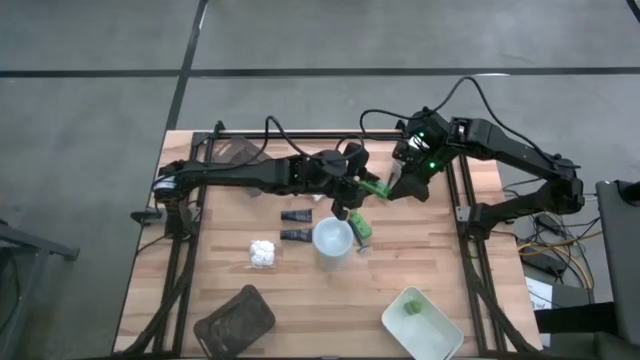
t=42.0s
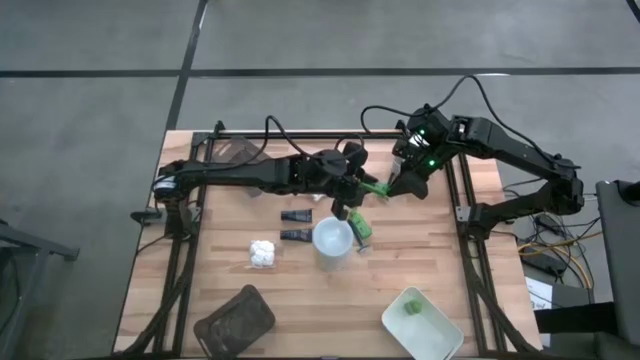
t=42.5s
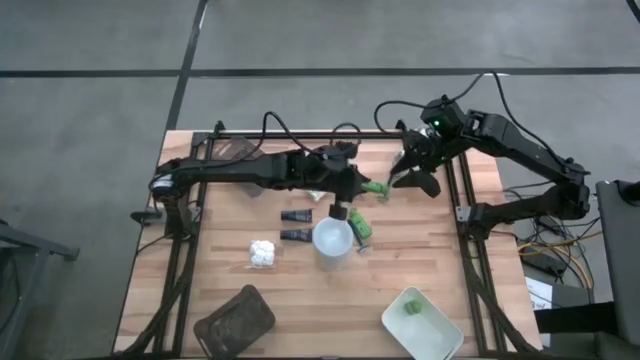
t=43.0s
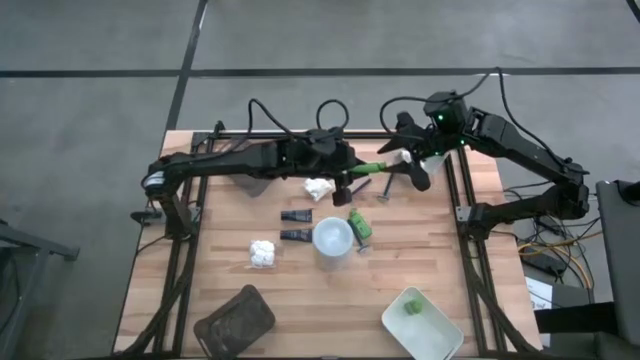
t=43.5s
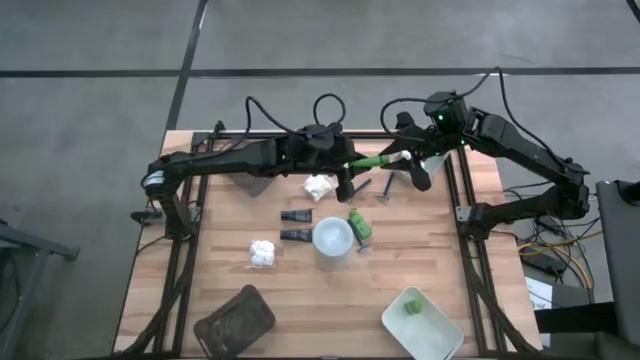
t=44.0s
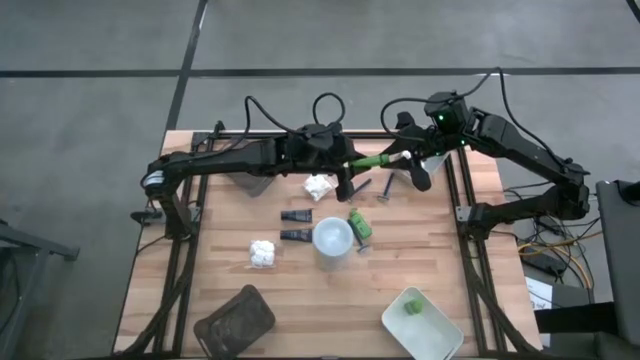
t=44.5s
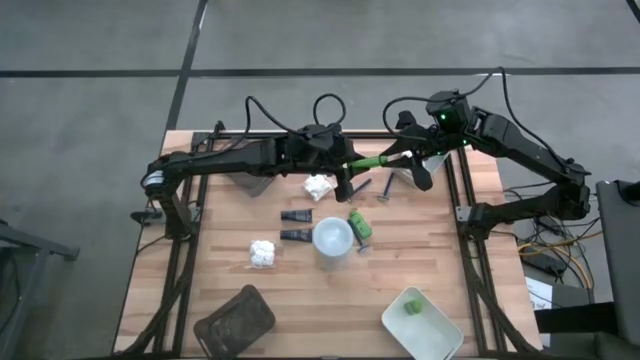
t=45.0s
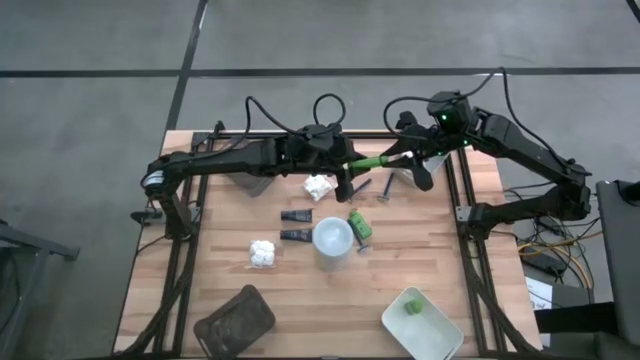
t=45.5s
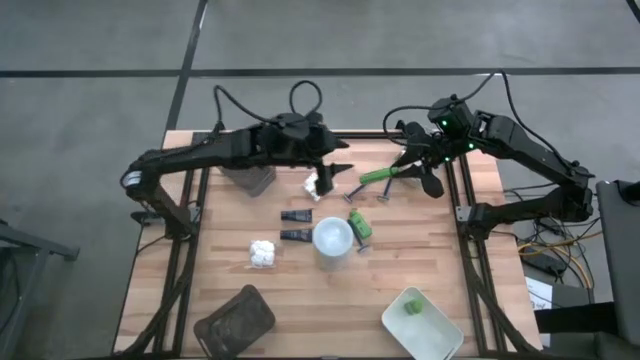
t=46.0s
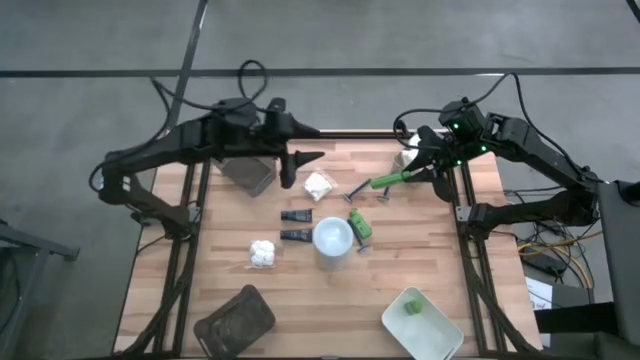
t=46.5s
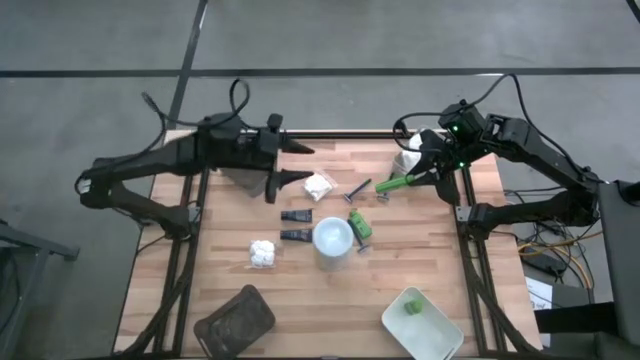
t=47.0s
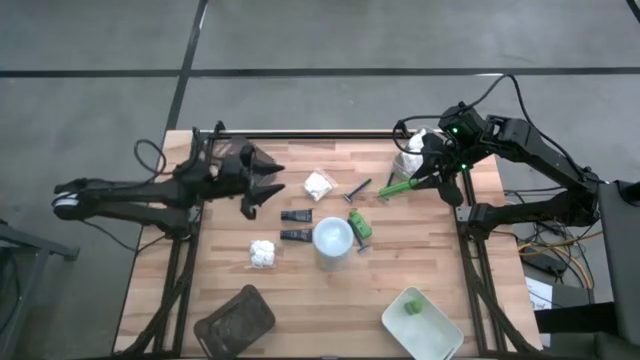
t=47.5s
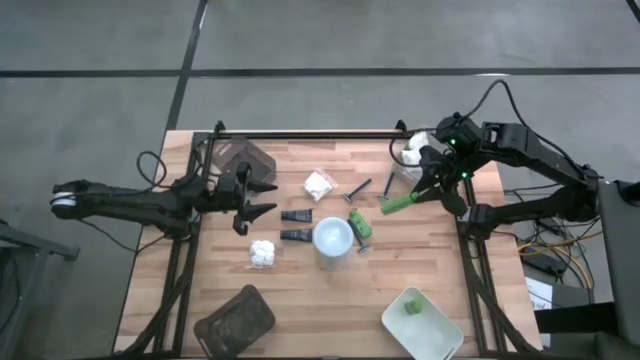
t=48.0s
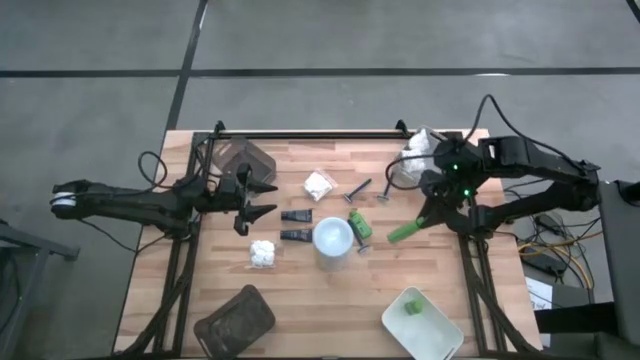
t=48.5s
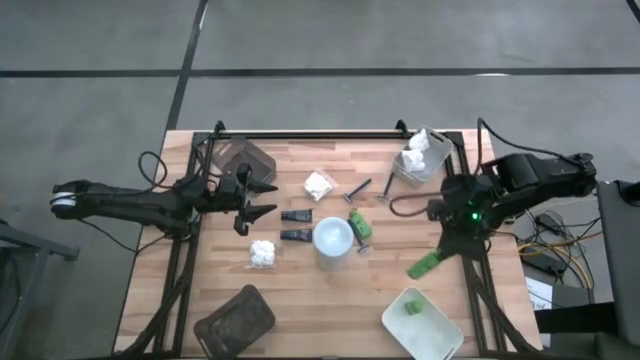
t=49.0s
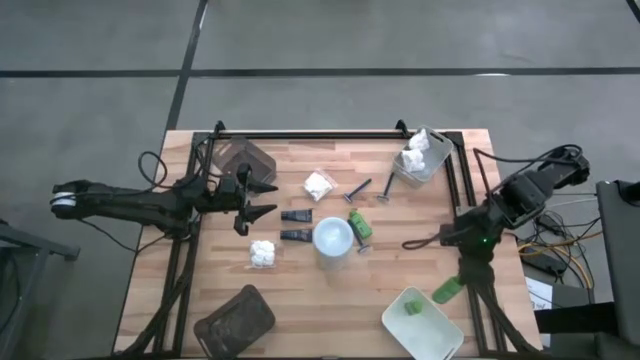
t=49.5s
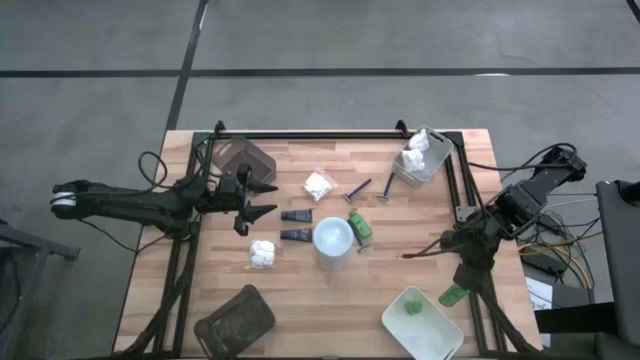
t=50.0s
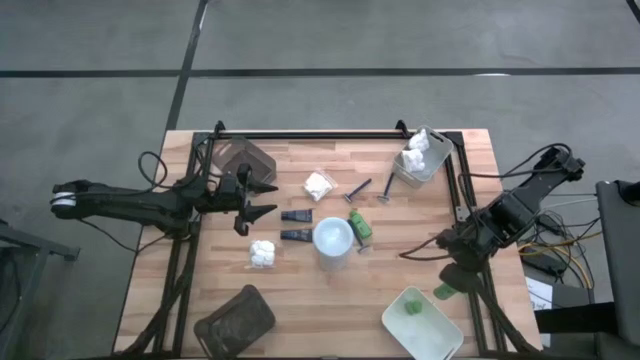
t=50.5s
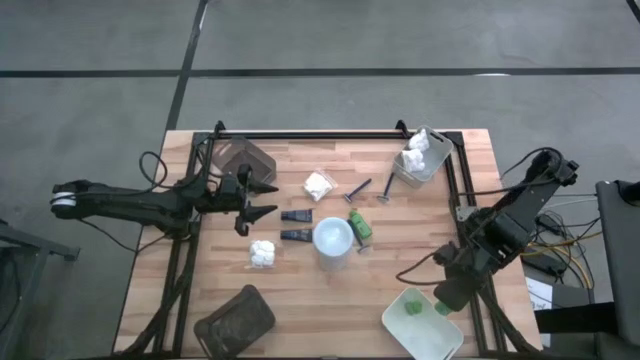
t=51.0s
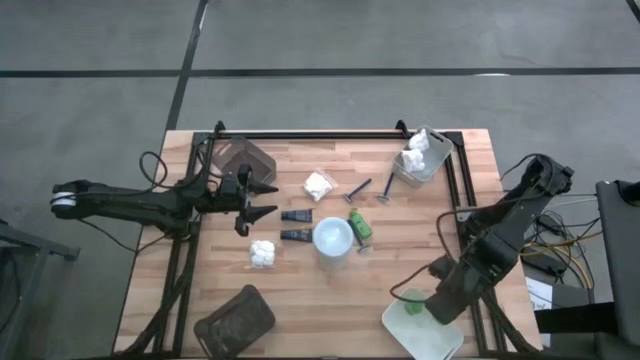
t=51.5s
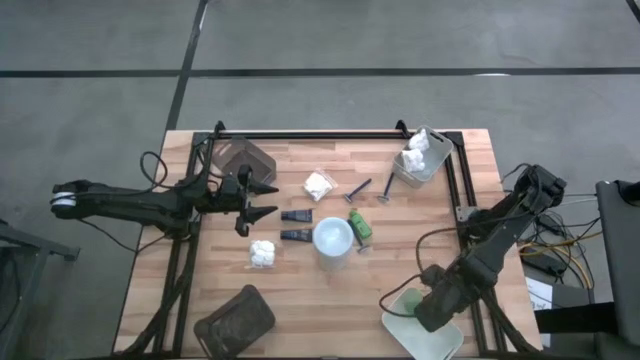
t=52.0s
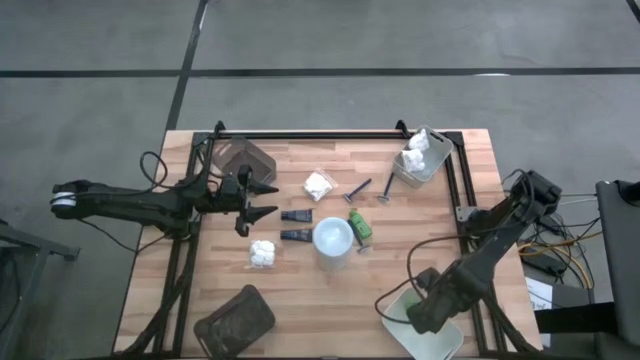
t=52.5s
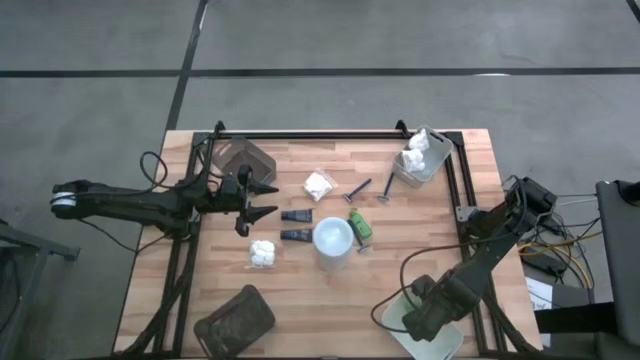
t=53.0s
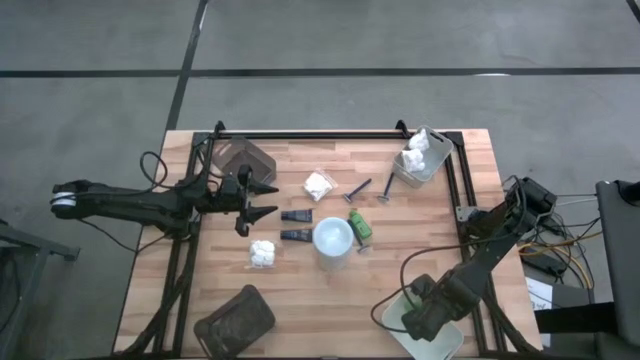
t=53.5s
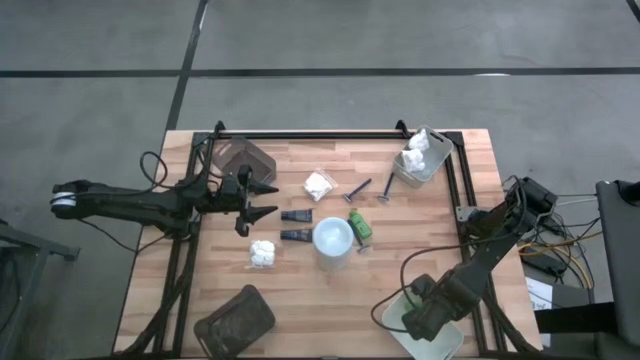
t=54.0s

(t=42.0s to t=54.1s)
Task: Pick & Place Travel size toiletries
Put the green shampoo into the white bin

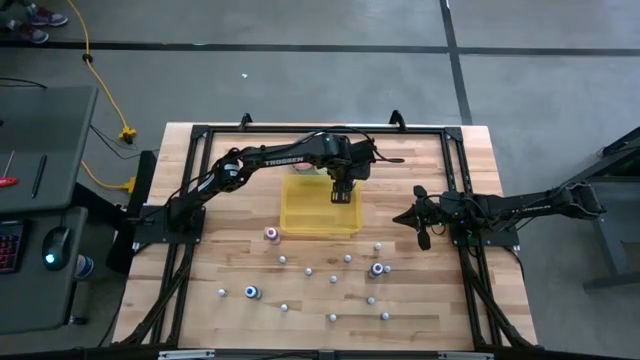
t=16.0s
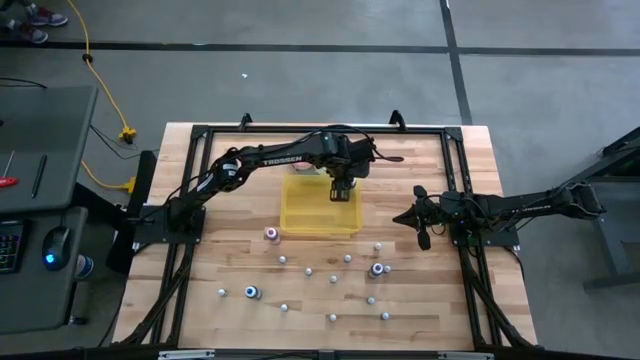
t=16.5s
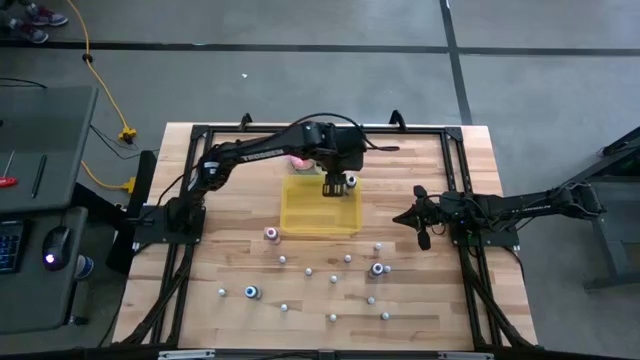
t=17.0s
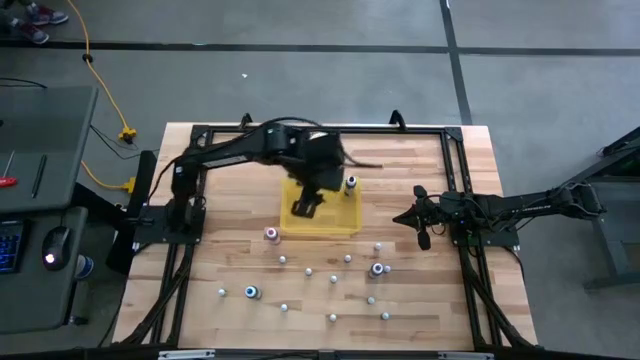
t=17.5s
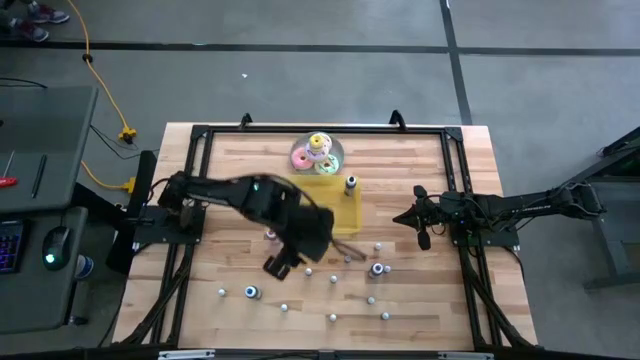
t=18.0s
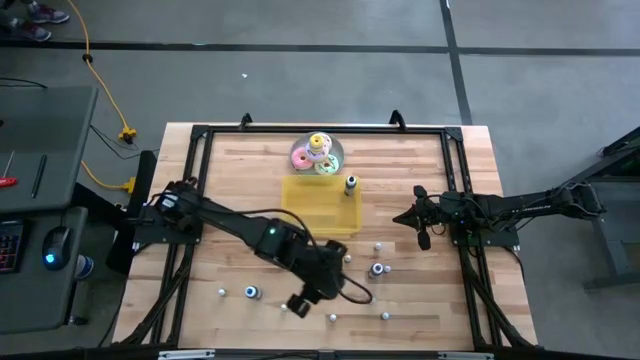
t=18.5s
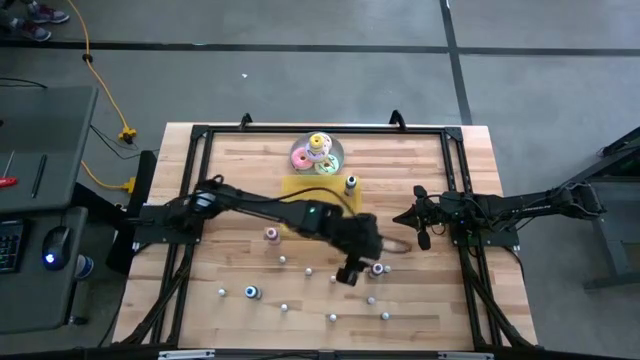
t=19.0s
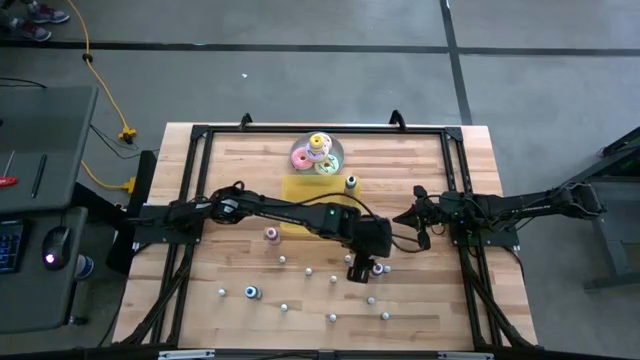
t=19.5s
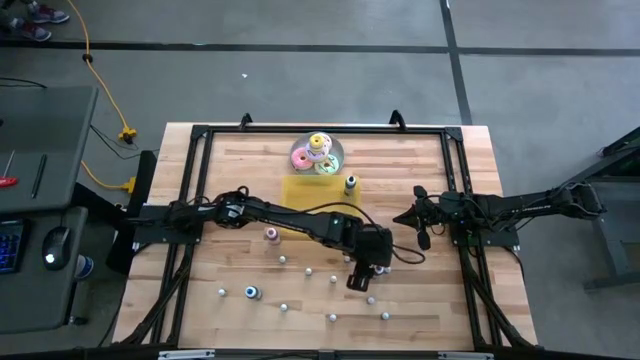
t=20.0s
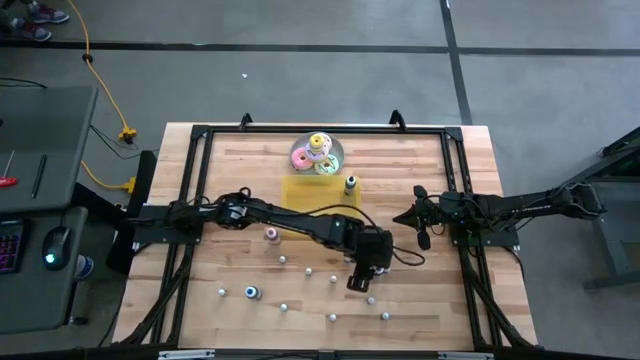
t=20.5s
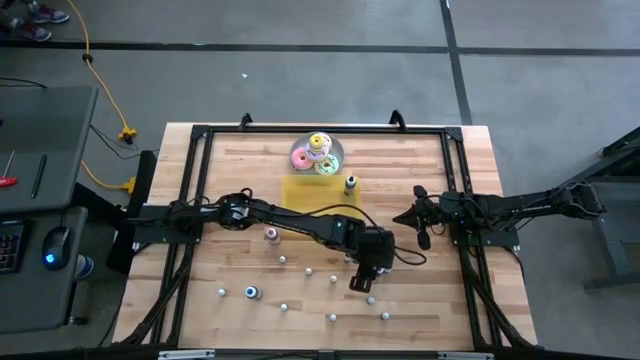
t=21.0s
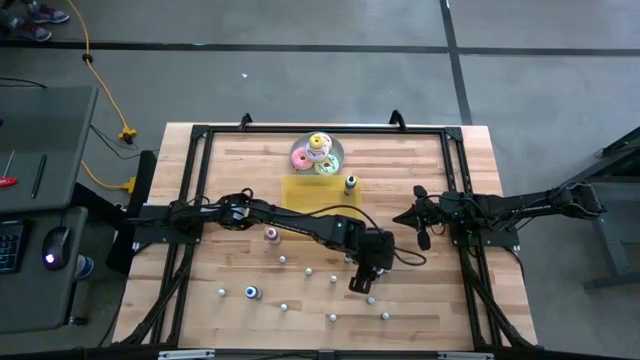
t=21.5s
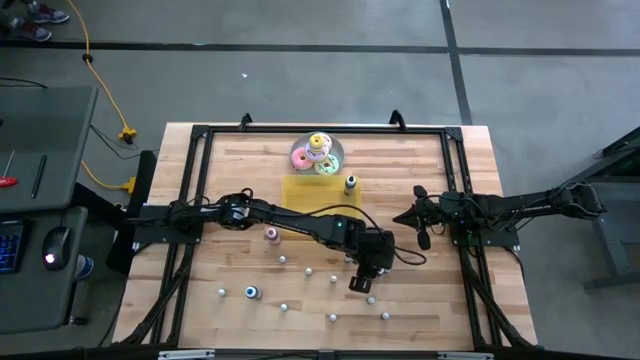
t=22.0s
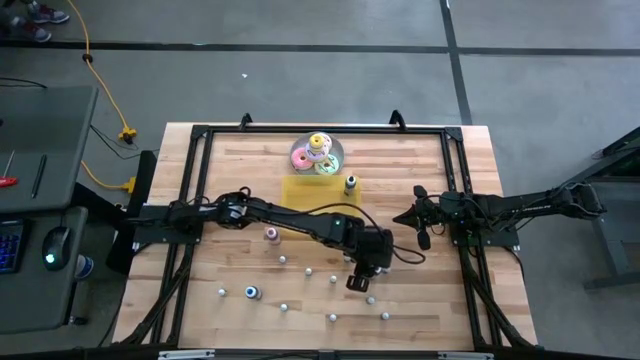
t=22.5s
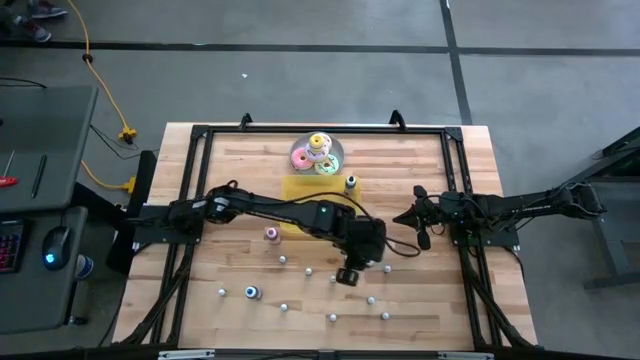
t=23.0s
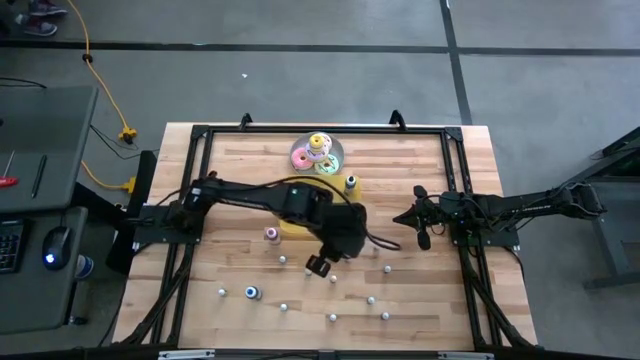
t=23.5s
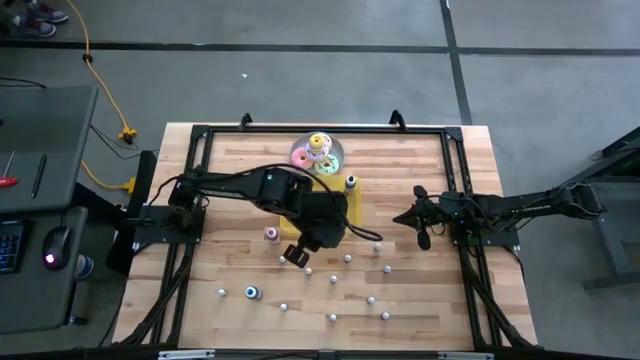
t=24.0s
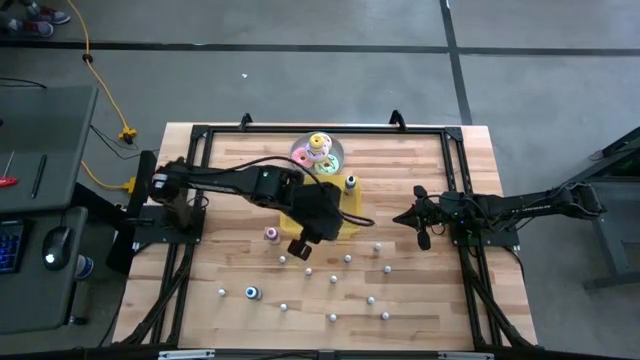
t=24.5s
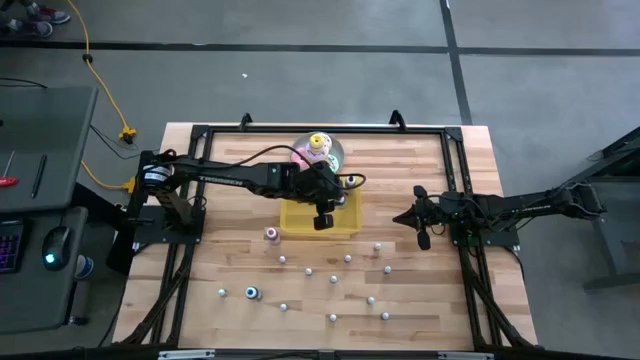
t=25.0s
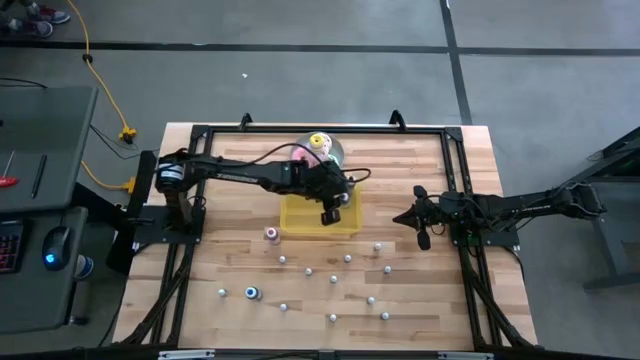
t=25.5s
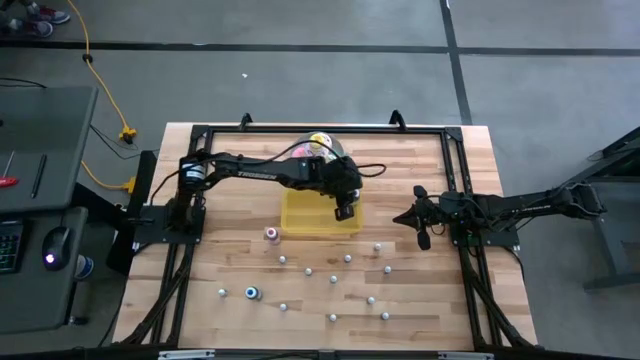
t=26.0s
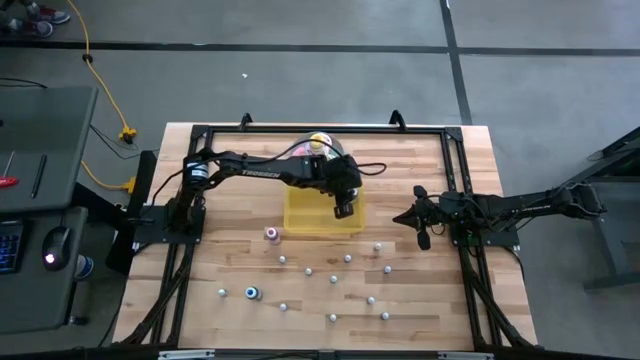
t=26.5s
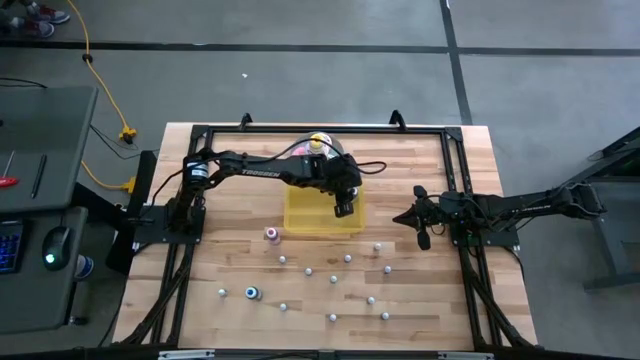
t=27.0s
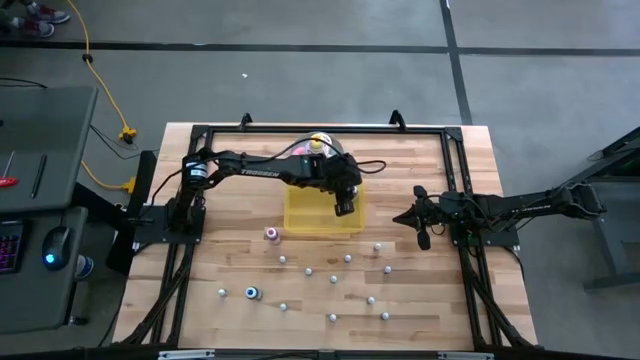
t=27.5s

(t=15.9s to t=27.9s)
Task: Pick & Place food coloring
Put the large violet food coloring bottle into the yellow container
